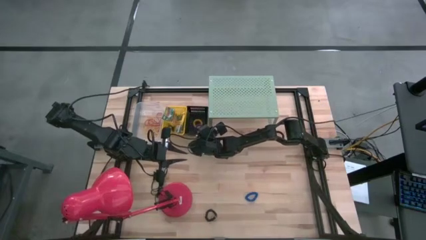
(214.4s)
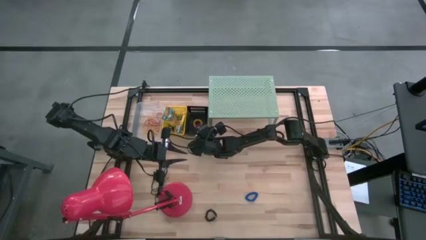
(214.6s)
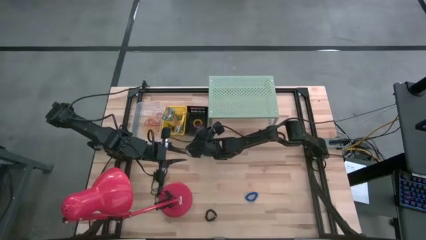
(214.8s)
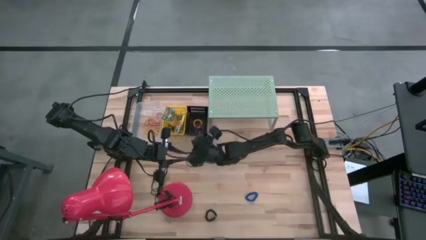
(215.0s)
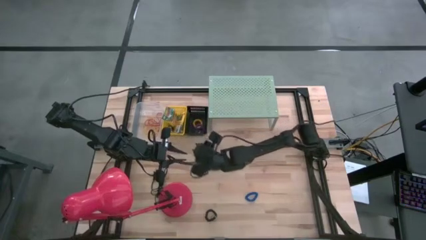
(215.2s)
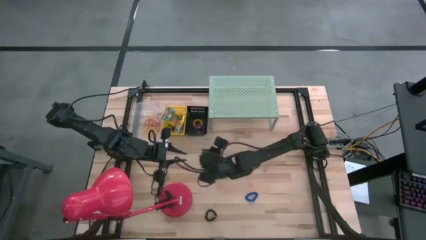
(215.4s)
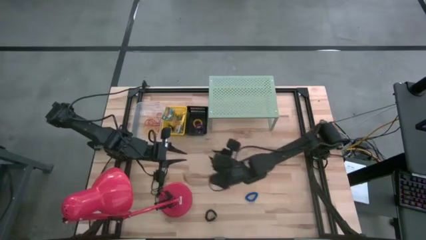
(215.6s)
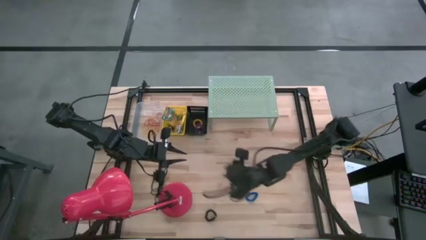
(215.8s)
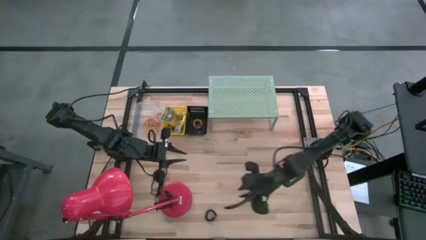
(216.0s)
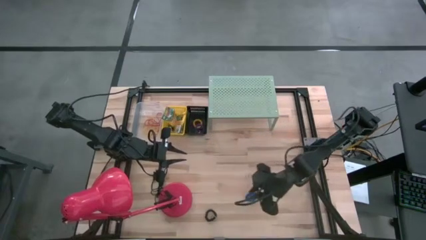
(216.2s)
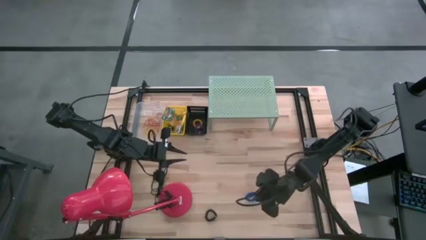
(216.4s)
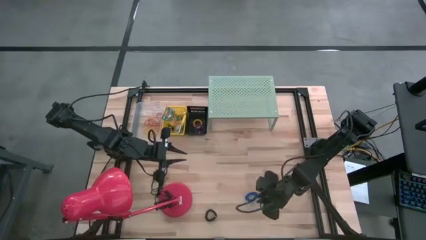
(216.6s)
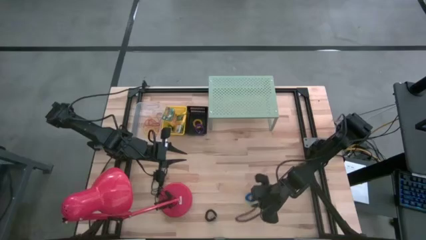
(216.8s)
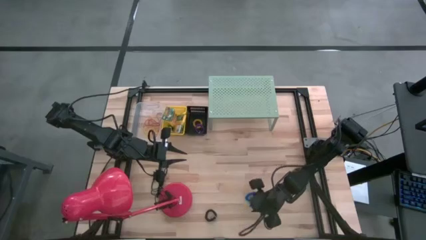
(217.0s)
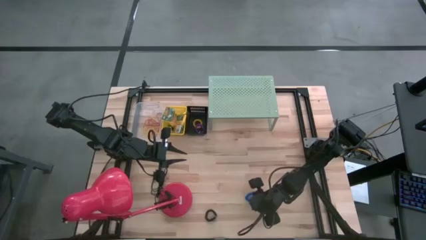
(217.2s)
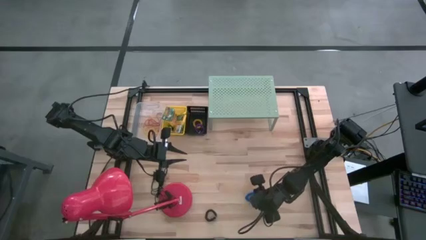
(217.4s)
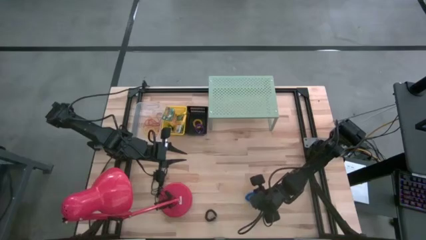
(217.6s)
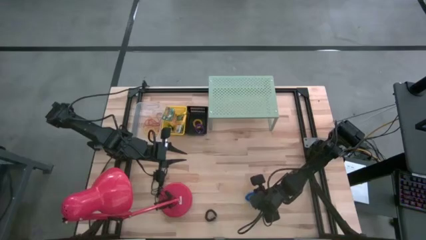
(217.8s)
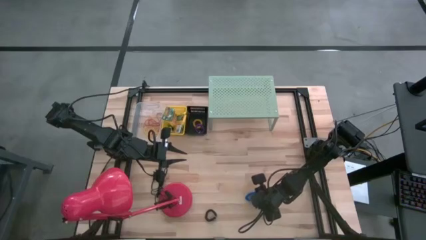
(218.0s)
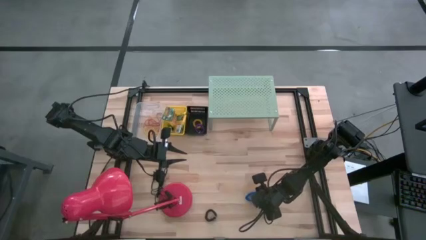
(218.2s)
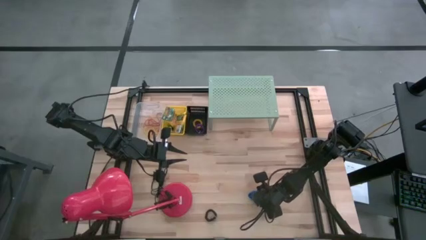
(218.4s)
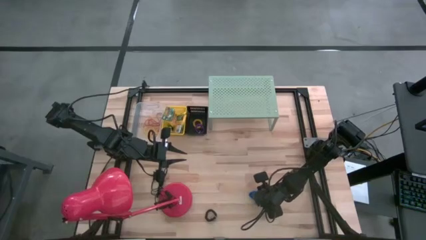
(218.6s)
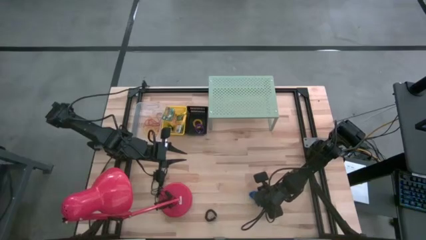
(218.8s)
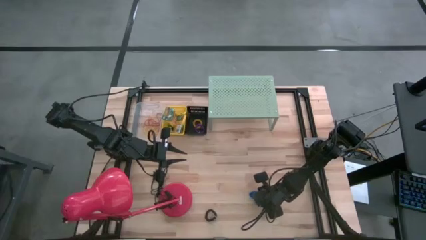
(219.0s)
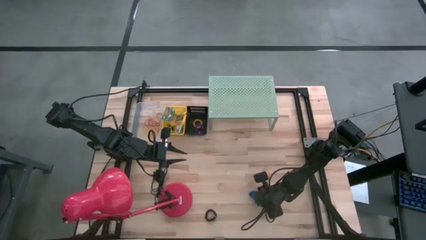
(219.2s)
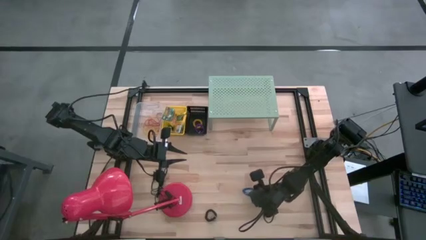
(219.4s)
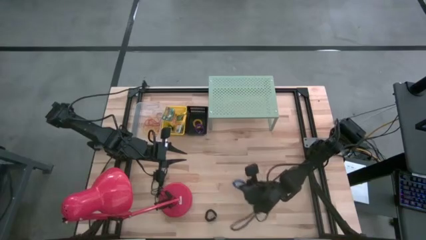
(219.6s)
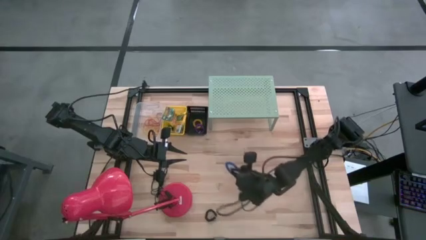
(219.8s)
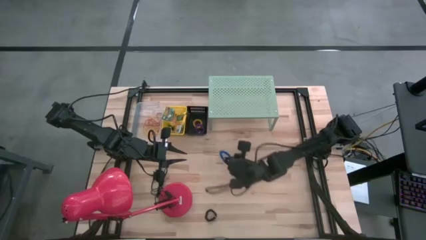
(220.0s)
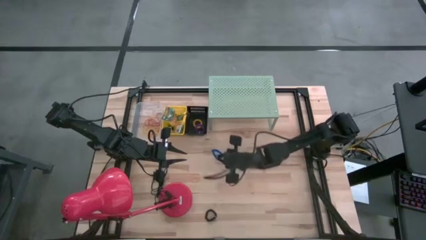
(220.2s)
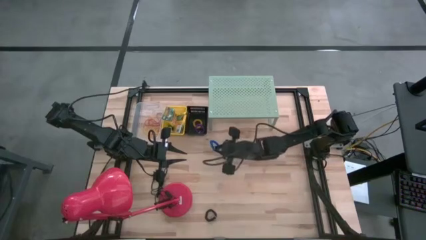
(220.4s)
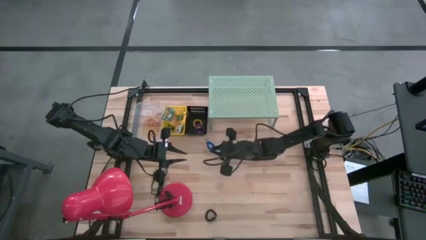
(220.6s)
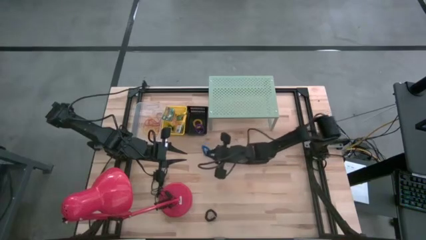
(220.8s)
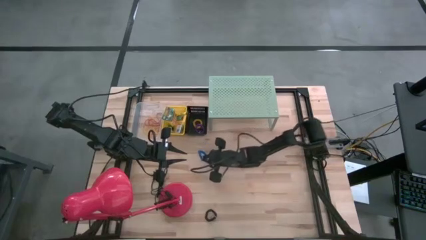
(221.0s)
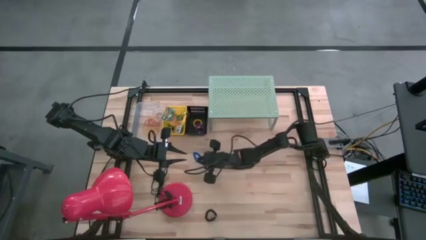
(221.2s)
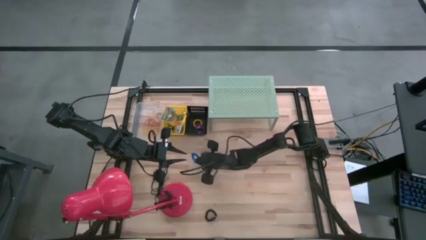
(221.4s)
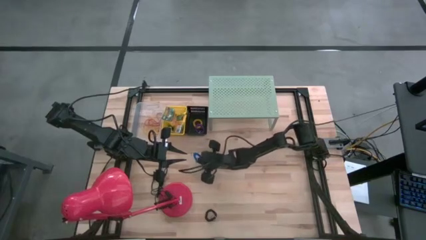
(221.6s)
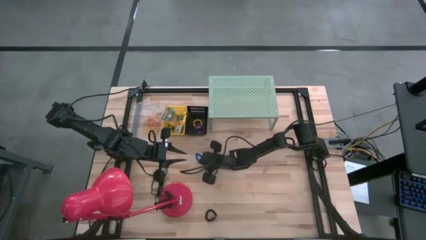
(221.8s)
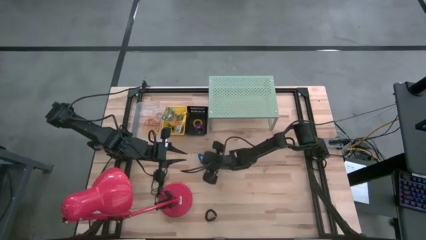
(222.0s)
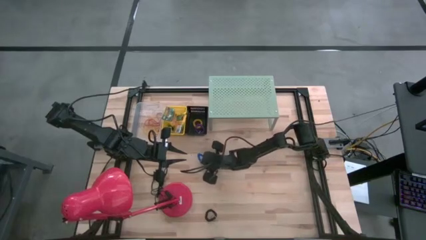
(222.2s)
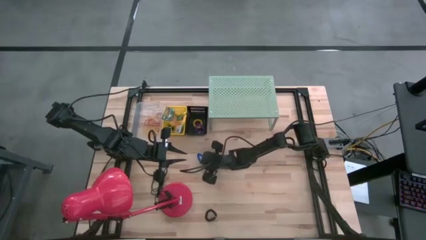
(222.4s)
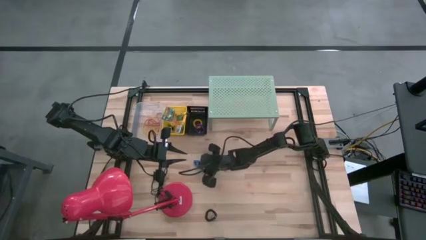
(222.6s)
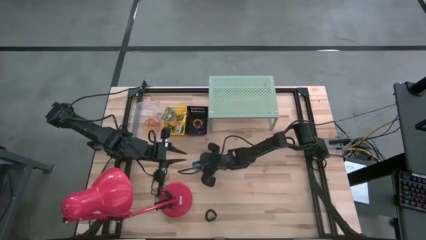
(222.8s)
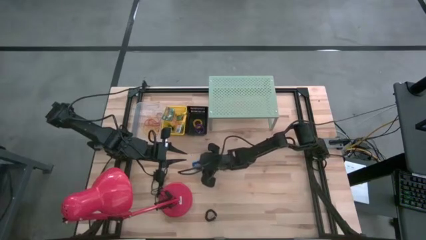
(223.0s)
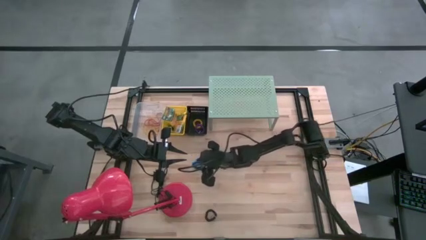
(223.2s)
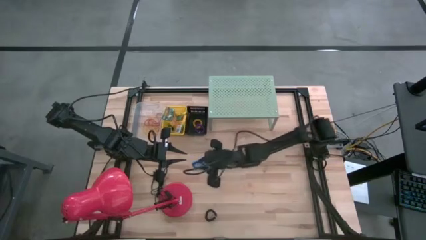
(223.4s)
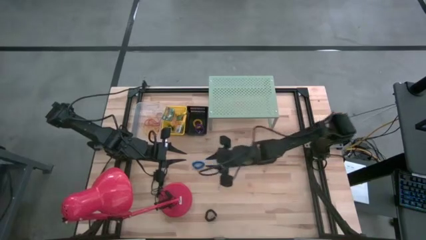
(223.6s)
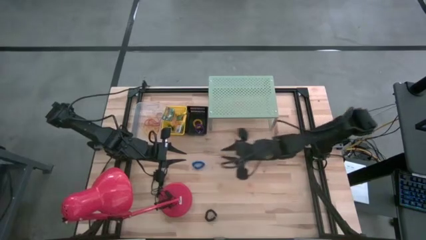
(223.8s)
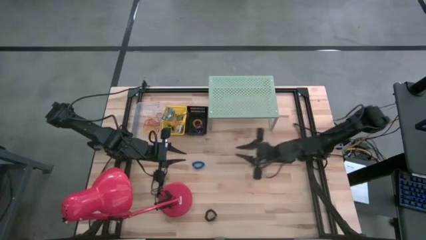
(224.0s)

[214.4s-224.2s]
Task: Pick & Place Office Desk Supplies
Put the blue spring rubber band into the black bin

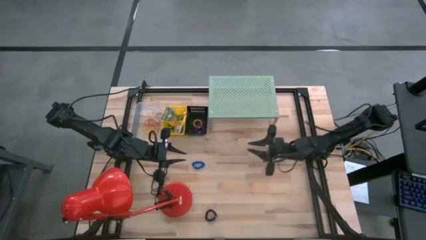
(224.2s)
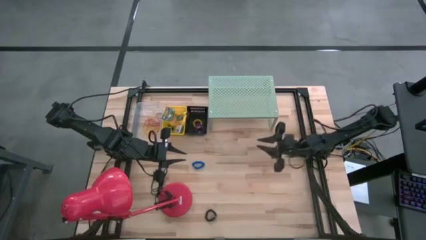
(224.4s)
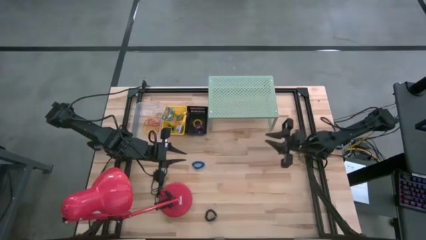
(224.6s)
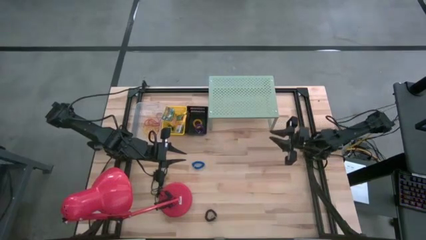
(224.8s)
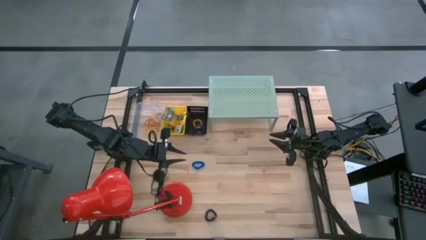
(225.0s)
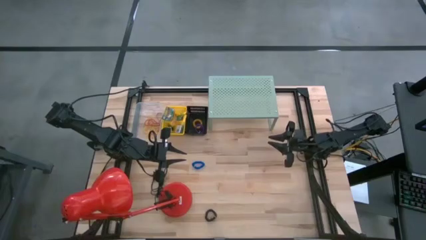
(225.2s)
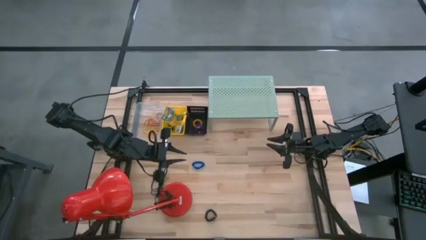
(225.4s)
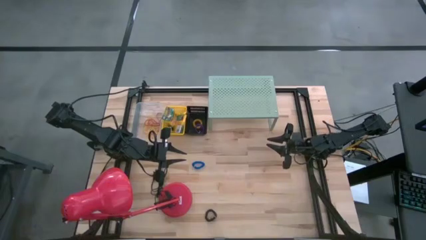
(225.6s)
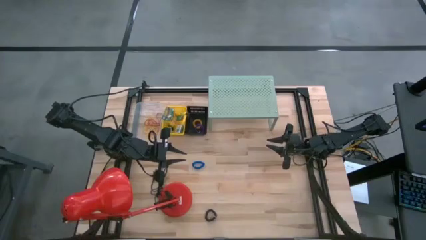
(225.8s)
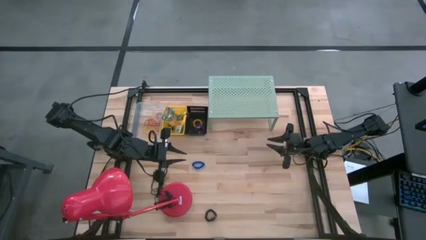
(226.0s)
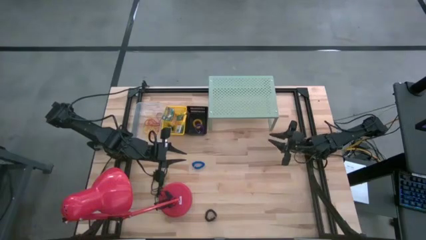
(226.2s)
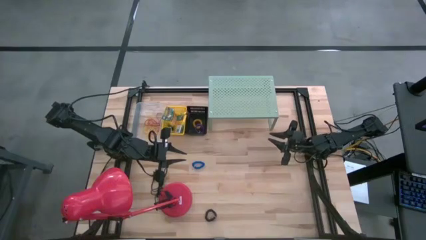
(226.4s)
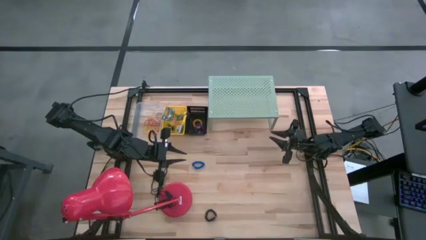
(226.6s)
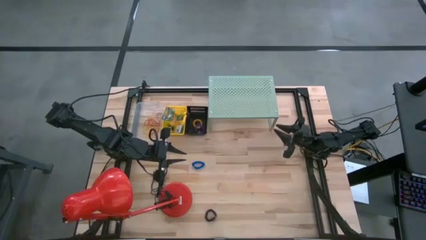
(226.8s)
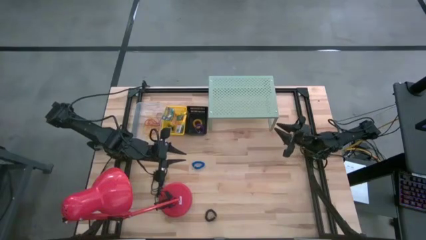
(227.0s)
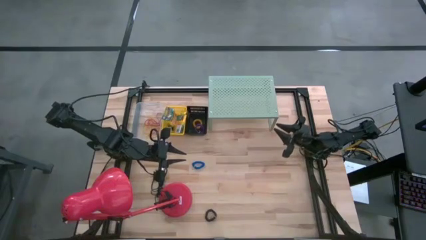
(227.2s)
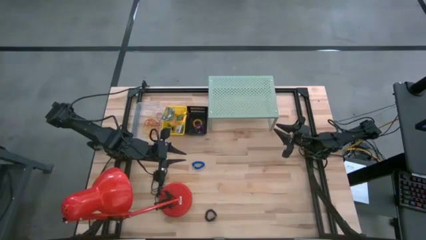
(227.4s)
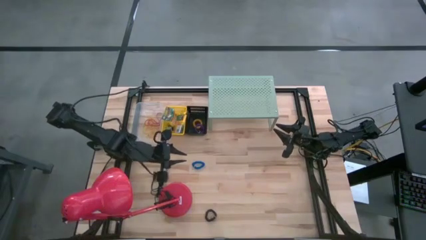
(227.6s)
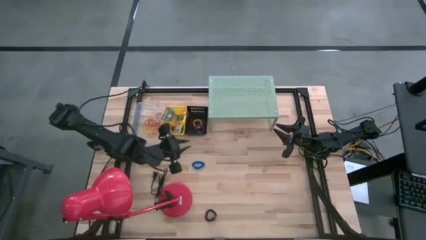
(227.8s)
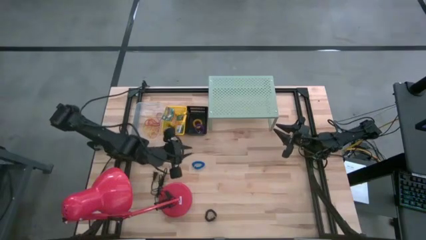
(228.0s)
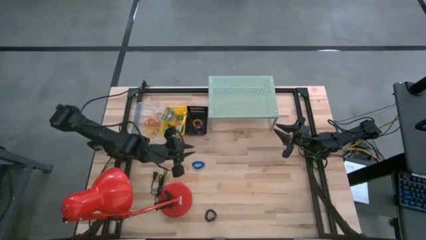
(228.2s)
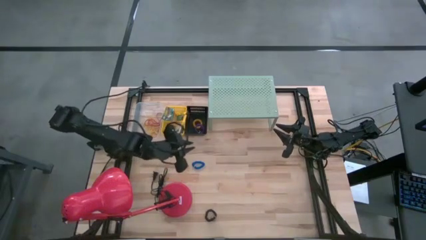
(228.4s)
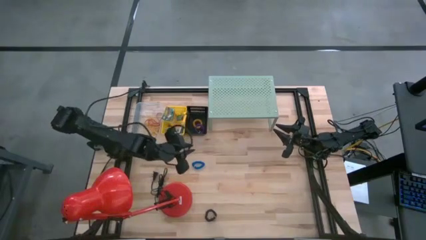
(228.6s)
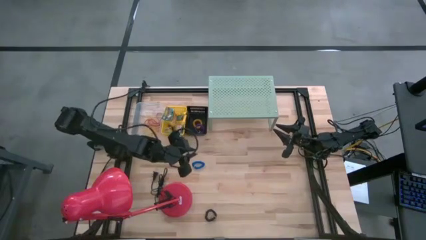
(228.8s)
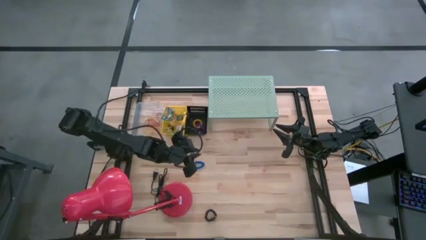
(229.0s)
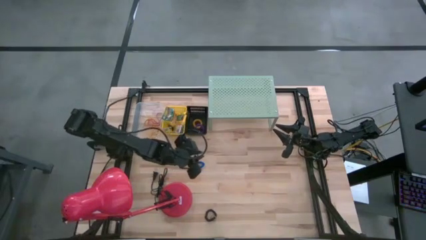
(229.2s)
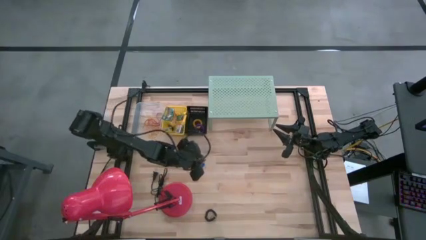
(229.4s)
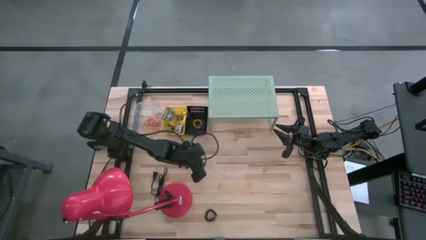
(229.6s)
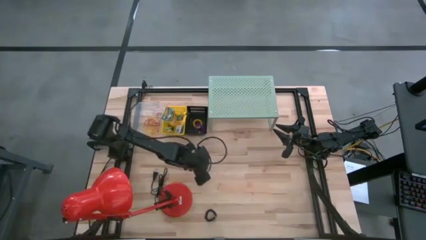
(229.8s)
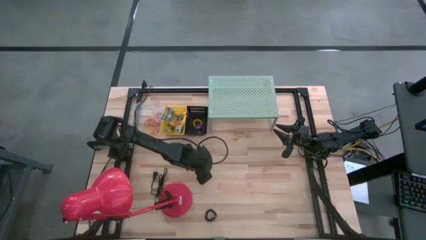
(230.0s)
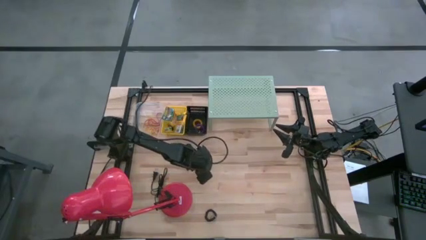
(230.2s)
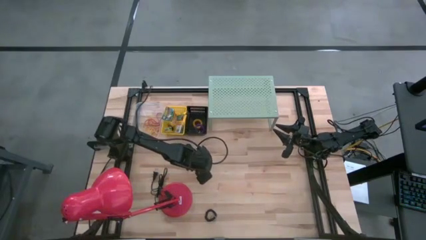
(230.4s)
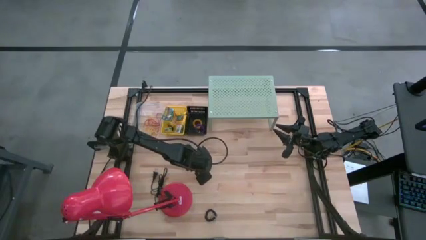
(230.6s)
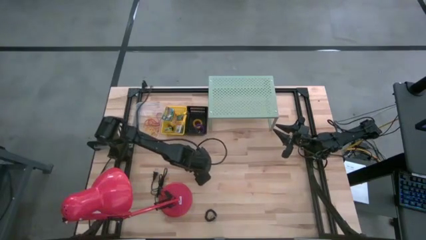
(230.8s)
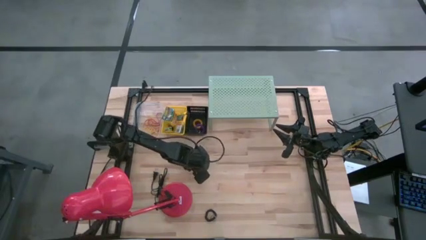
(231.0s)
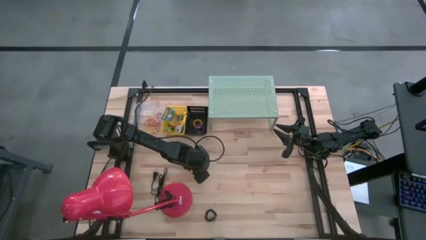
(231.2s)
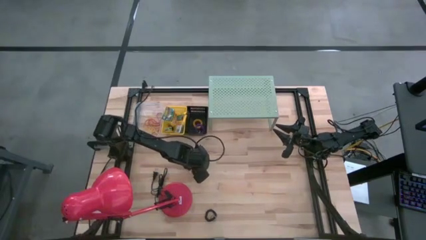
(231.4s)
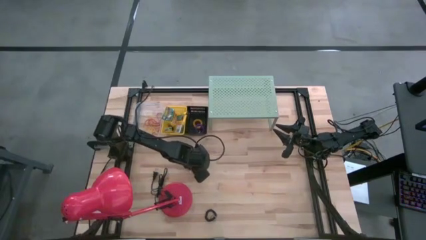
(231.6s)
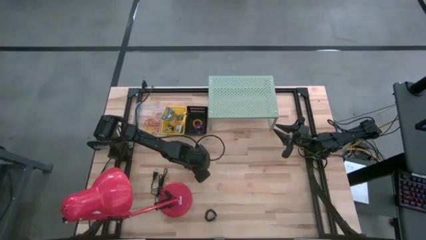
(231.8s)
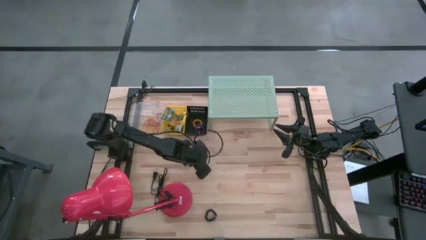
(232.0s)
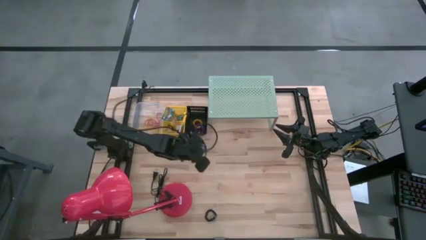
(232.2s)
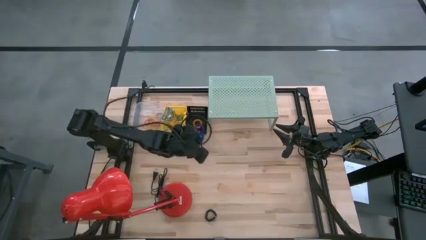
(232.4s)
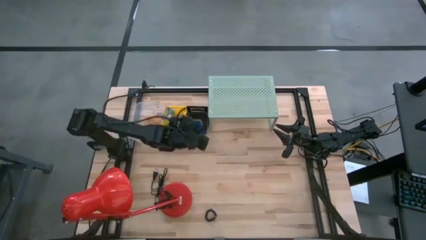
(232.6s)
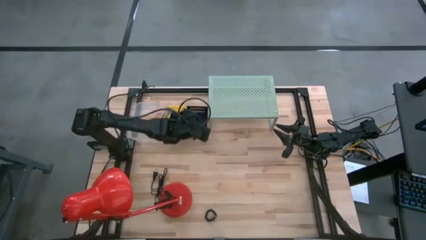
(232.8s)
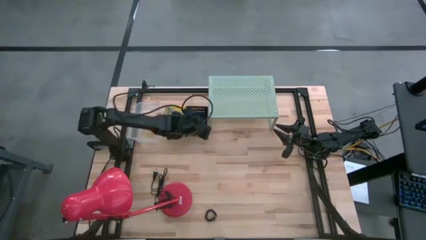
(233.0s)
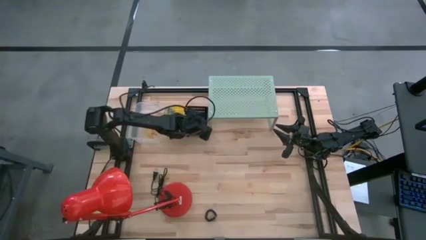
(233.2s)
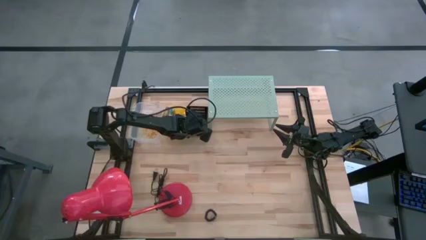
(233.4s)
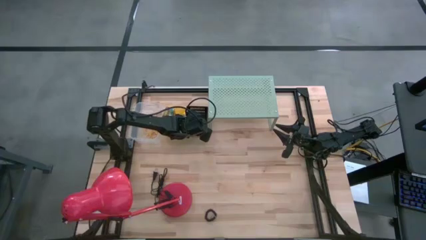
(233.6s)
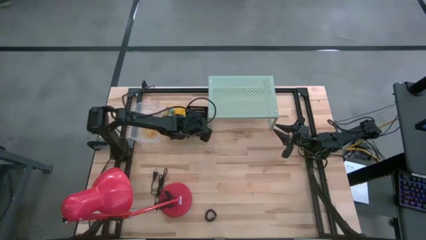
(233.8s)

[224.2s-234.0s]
Put the blue spring rubber band into the black bin
